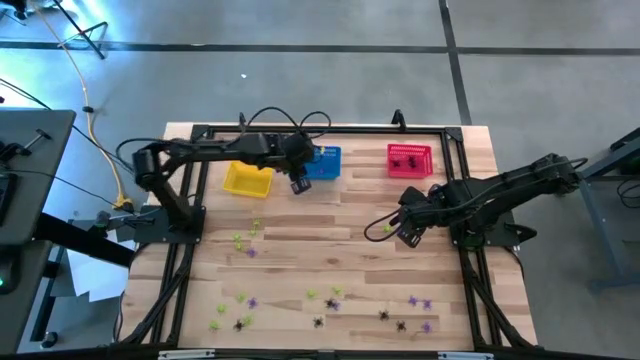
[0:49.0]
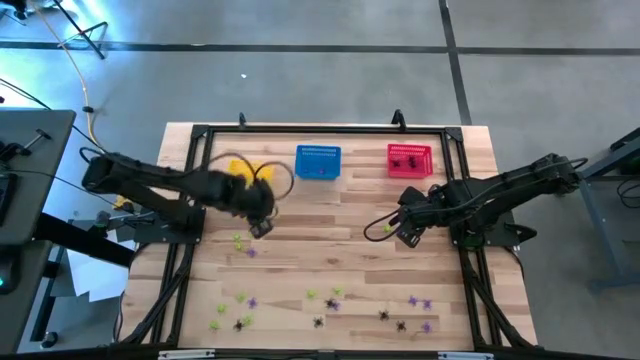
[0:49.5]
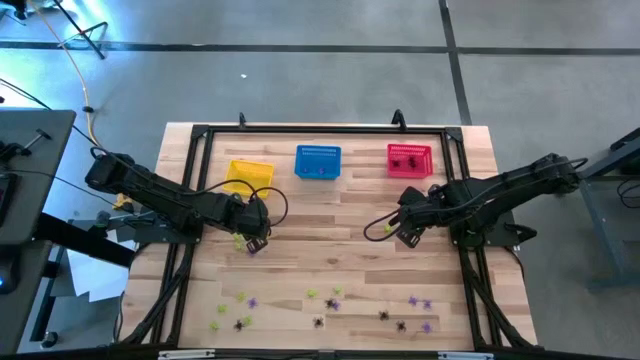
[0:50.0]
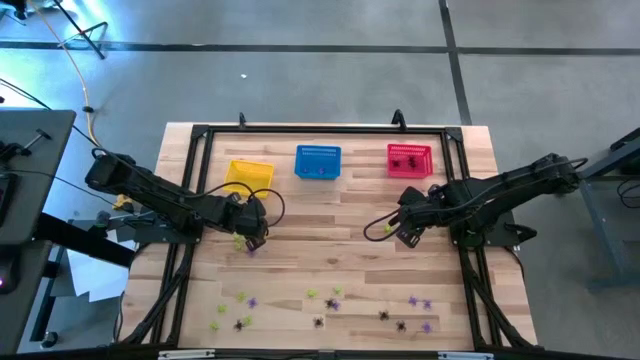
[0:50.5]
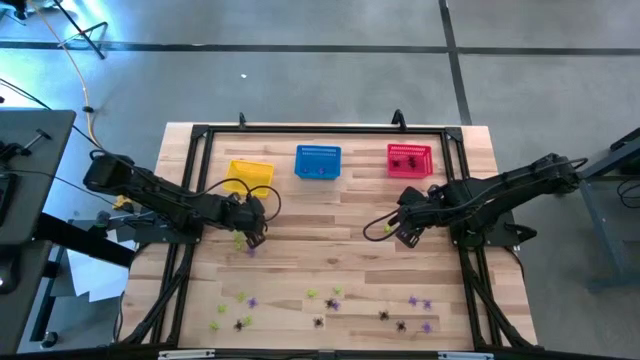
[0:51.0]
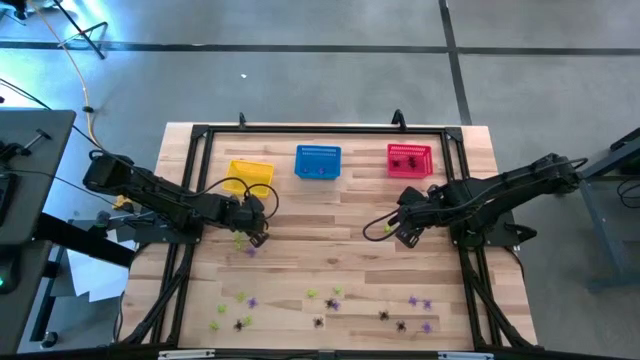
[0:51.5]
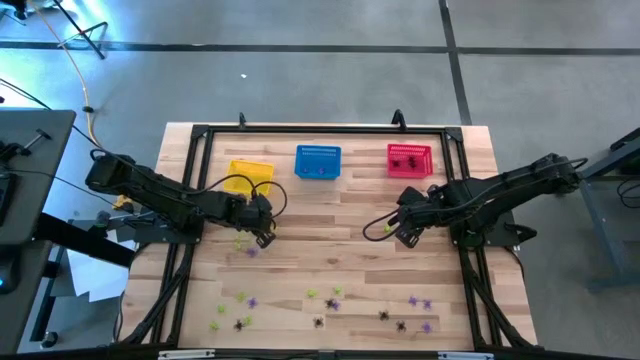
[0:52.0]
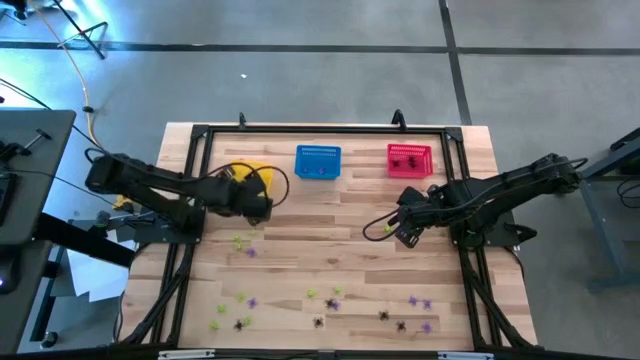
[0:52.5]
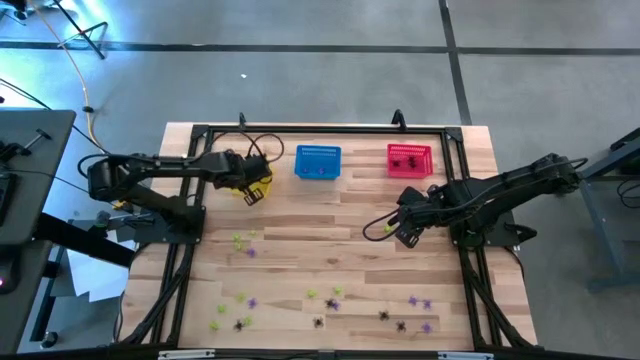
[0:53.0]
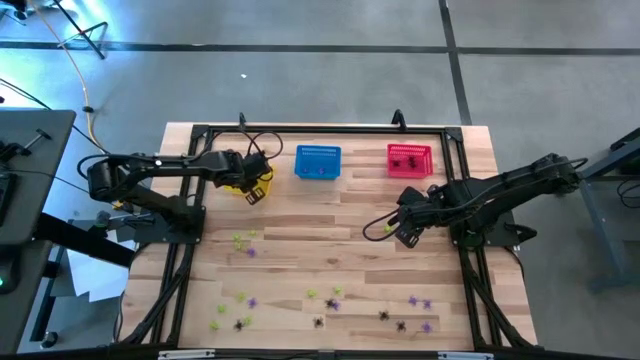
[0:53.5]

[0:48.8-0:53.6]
Task: Sort Halloween decoration
Put the green spider toy into the yellow bin

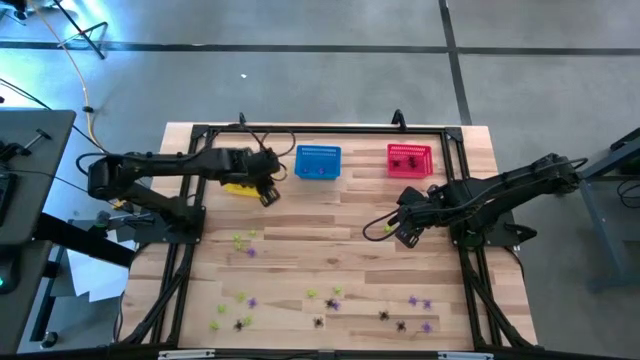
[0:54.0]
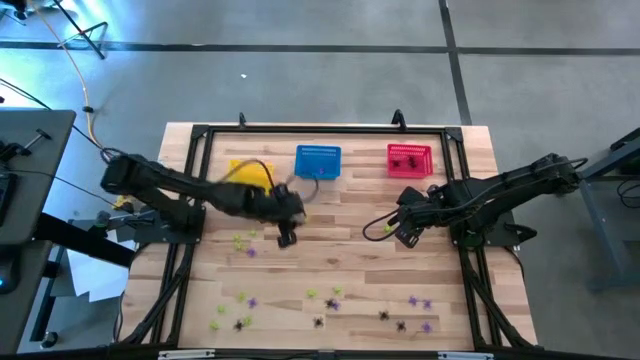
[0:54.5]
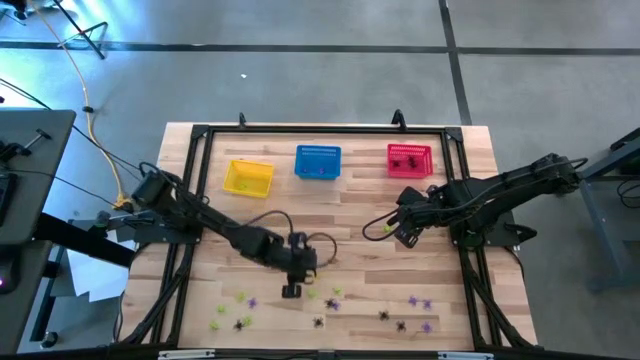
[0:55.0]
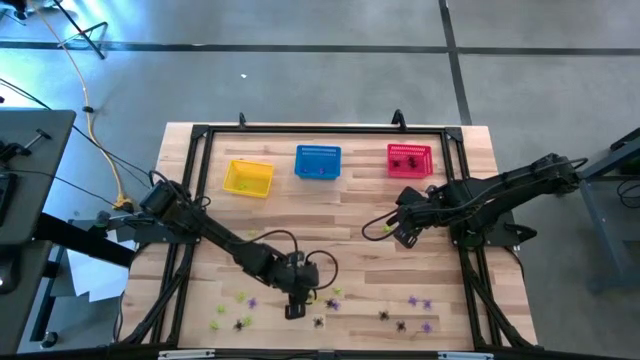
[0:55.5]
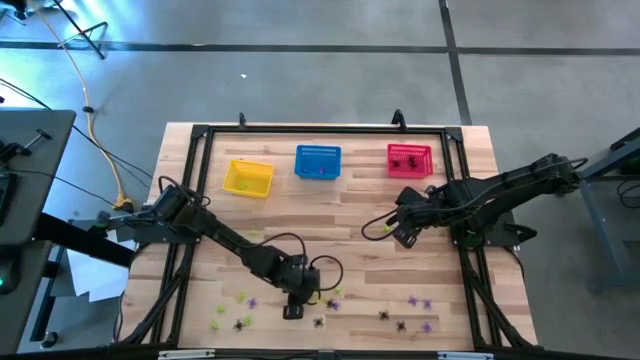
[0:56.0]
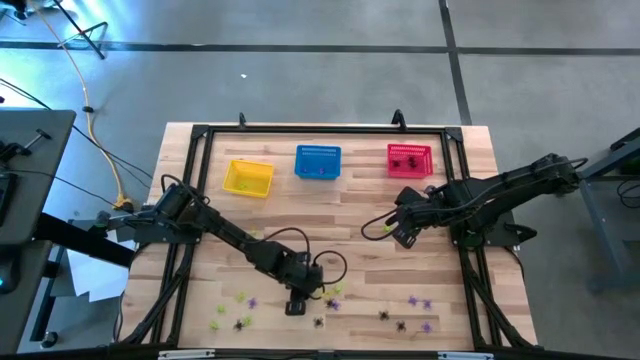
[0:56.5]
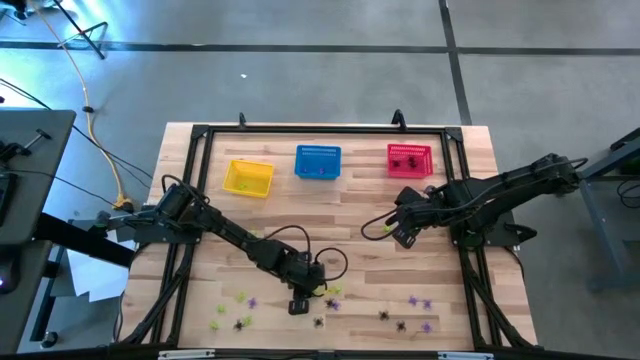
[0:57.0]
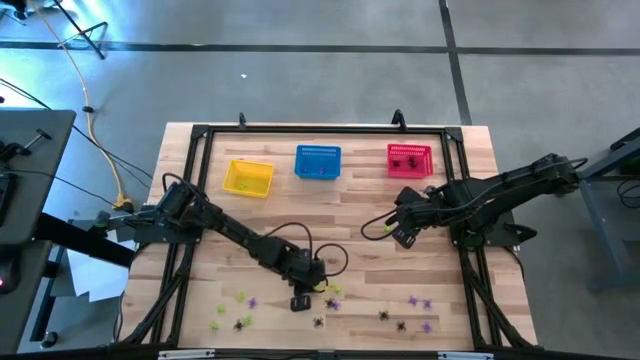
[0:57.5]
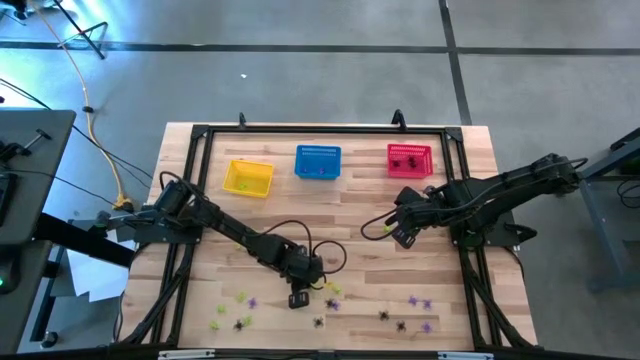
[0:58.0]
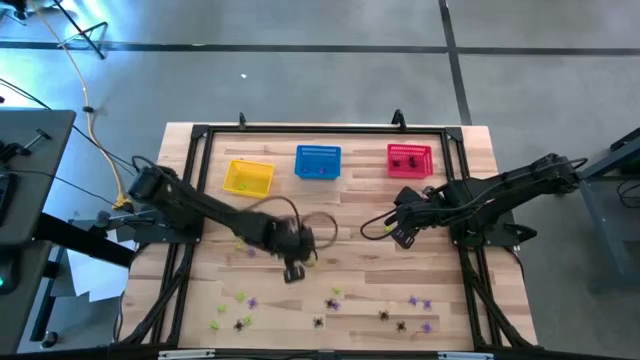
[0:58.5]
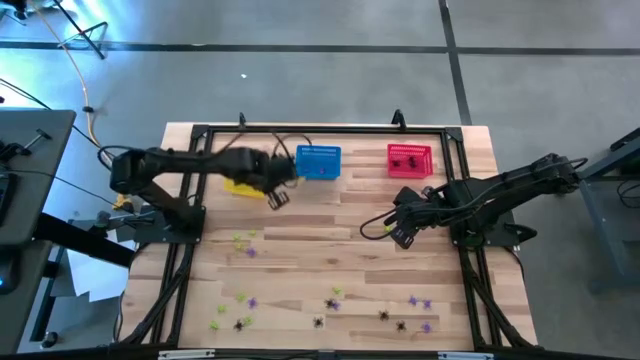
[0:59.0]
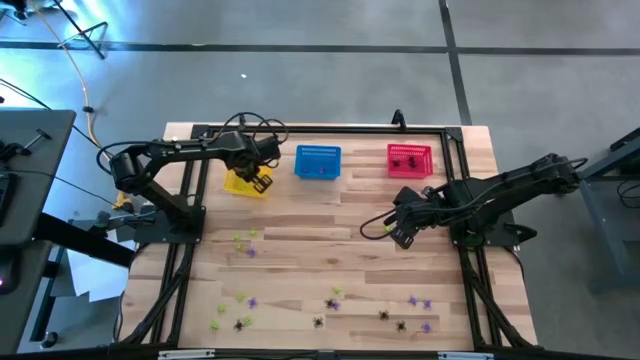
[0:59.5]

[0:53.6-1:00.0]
Put the green spider toy into the yellow bin

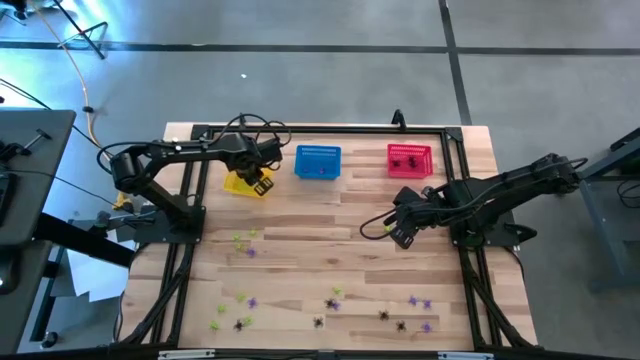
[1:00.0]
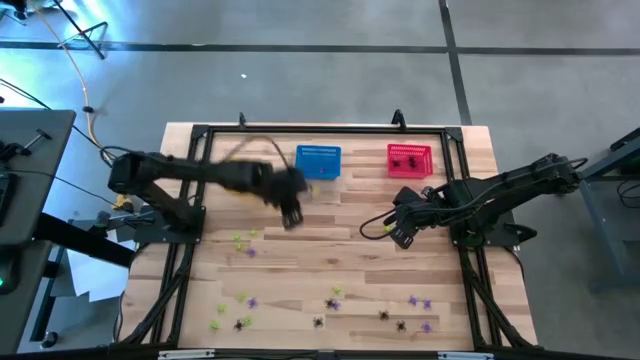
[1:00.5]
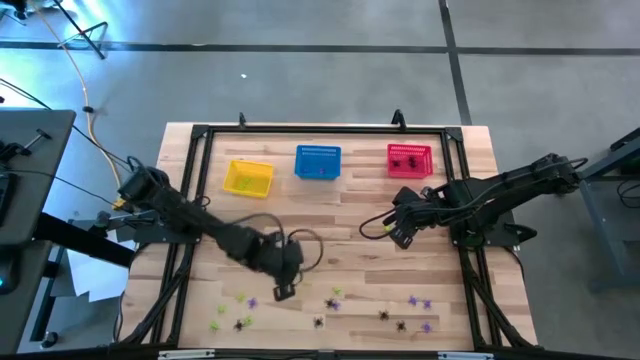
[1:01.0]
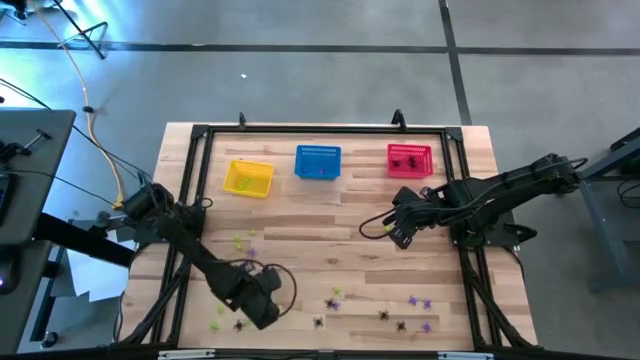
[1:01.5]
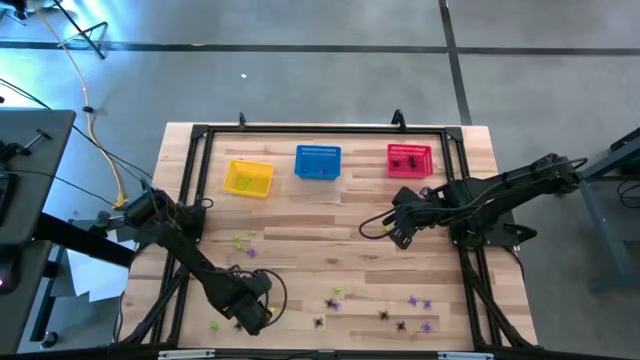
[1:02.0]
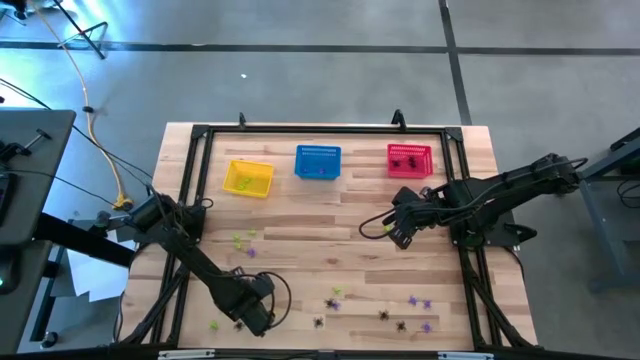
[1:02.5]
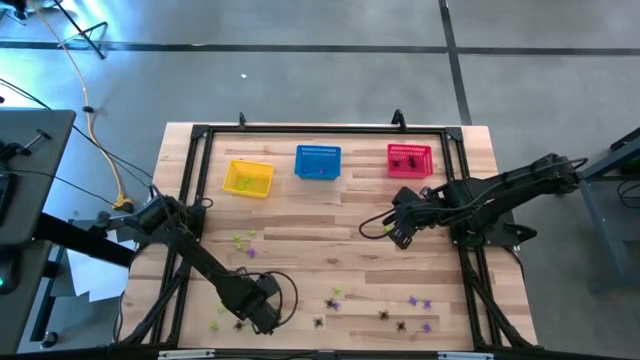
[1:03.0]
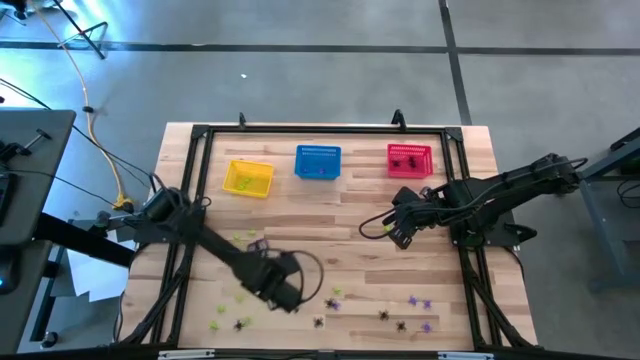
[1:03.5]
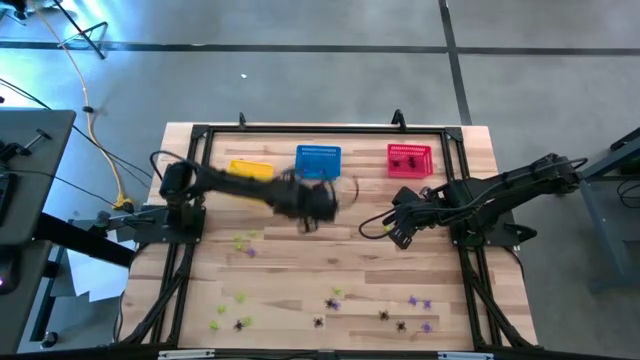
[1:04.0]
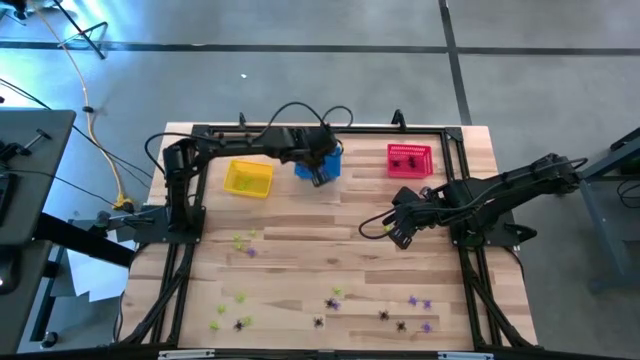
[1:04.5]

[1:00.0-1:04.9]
Put the purple spider toy into the blue bin

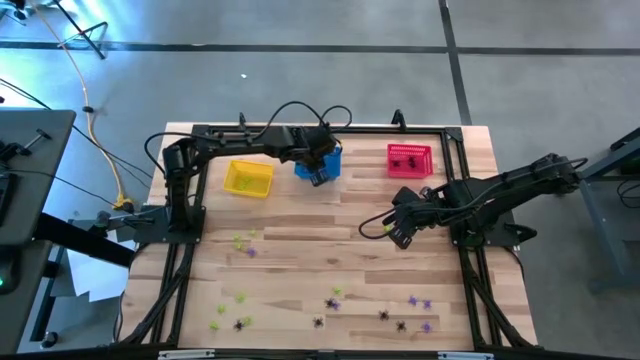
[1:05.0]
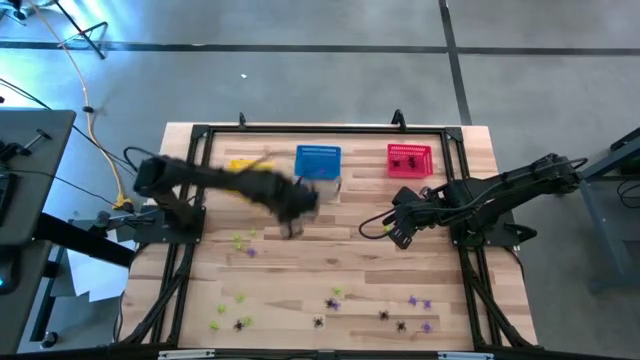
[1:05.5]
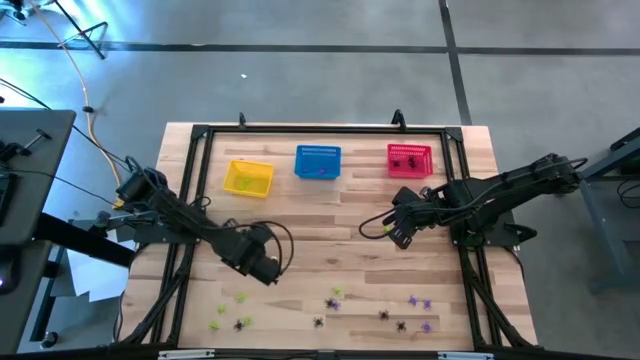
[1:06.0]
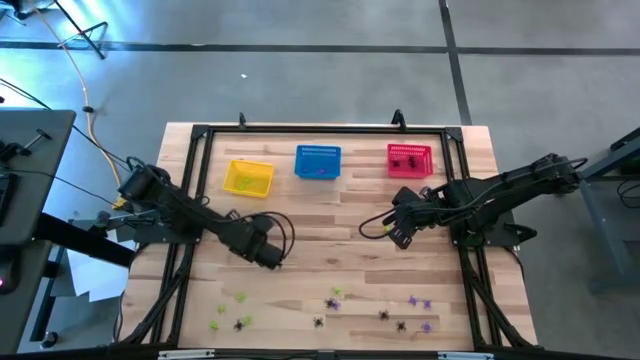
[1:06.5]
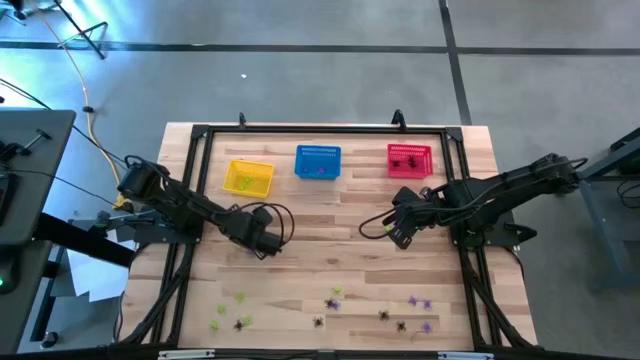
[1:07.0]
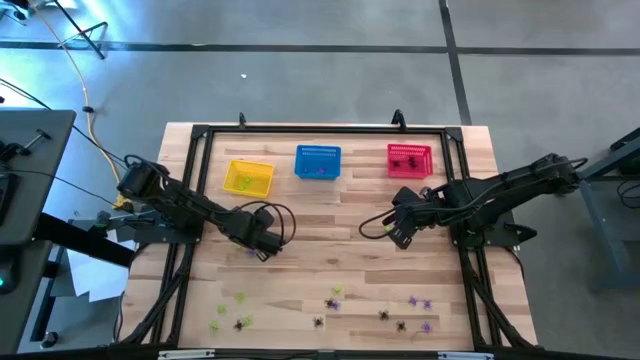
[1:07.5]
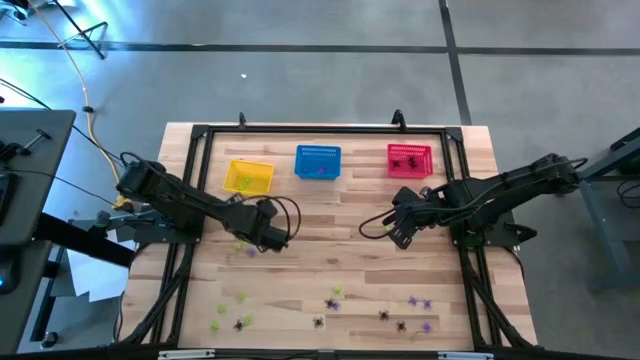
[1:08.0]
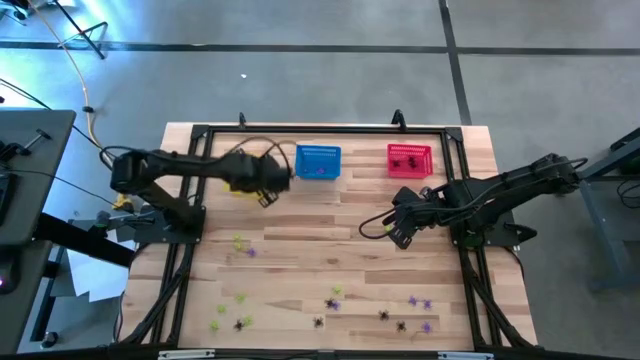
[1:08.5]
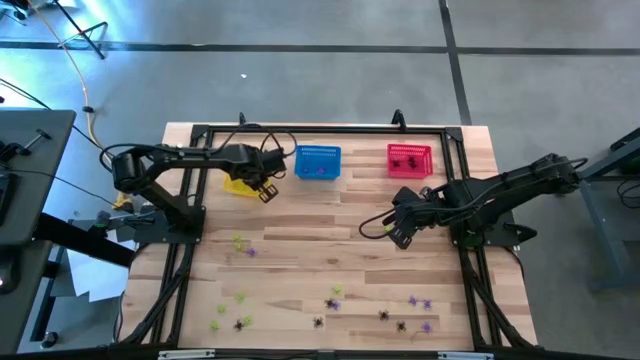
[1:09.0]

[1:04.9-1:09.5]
Put the green spider toy into the yellow bin
